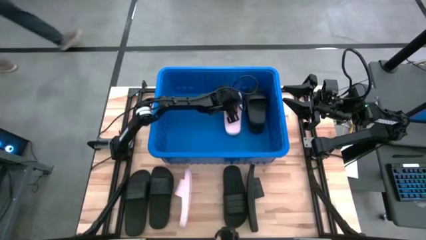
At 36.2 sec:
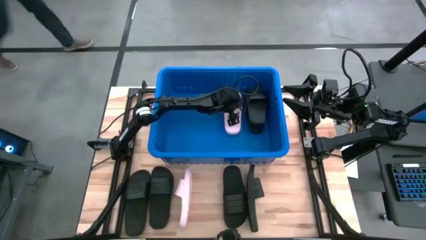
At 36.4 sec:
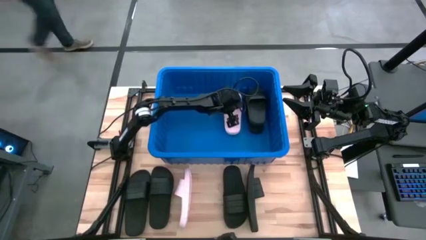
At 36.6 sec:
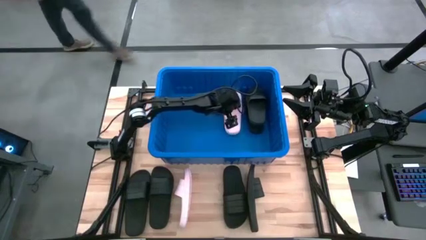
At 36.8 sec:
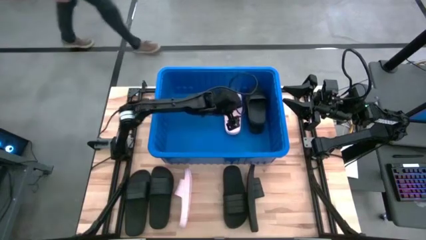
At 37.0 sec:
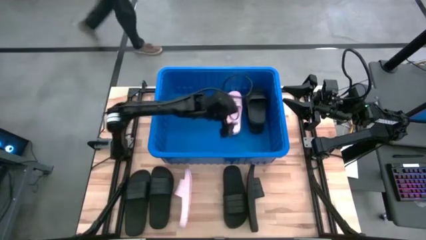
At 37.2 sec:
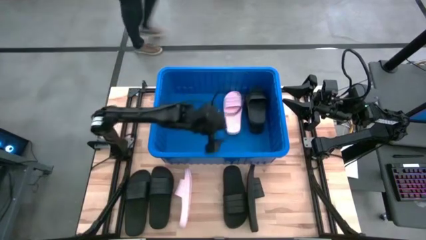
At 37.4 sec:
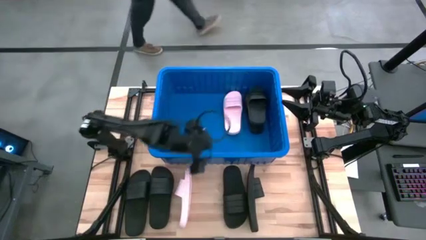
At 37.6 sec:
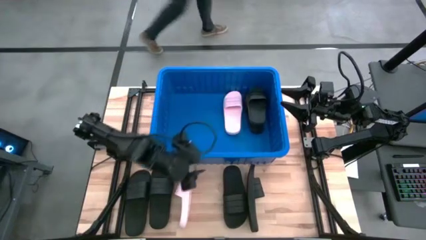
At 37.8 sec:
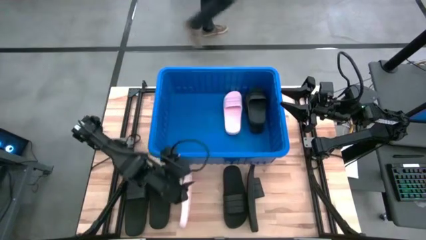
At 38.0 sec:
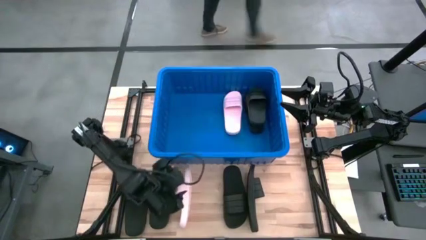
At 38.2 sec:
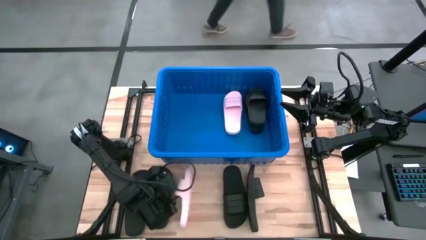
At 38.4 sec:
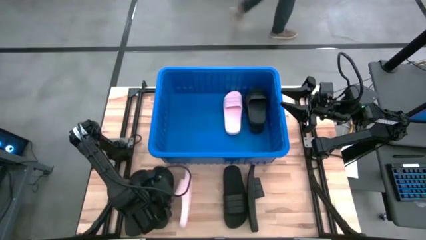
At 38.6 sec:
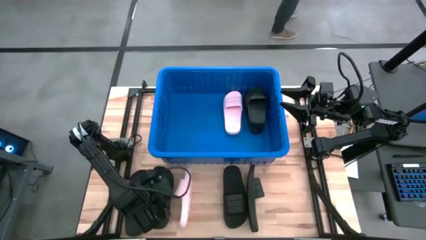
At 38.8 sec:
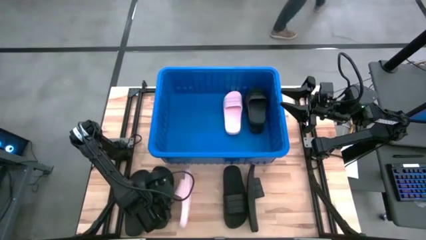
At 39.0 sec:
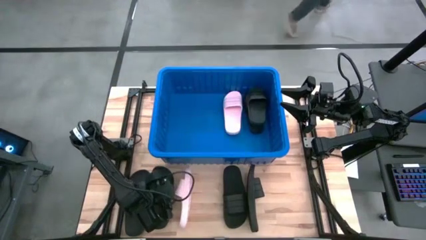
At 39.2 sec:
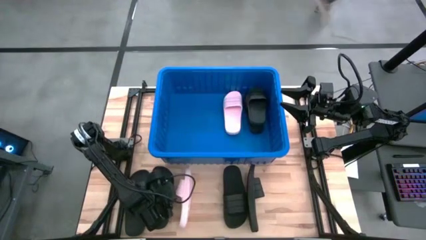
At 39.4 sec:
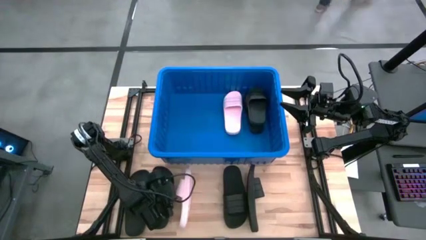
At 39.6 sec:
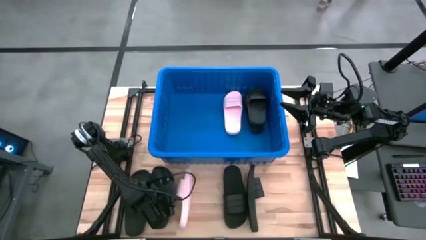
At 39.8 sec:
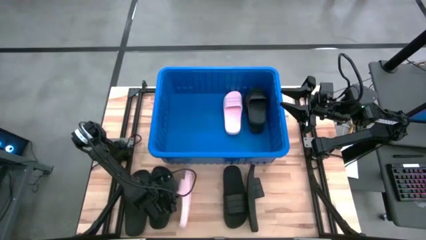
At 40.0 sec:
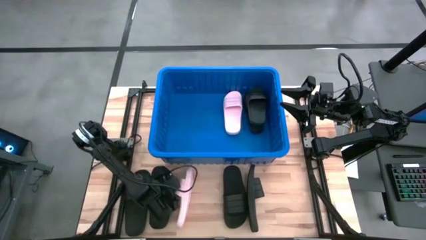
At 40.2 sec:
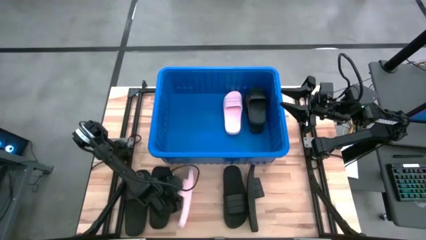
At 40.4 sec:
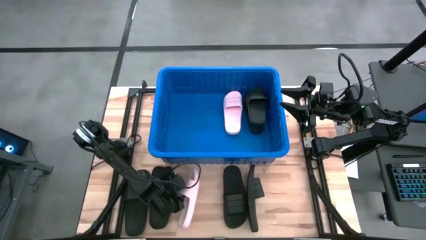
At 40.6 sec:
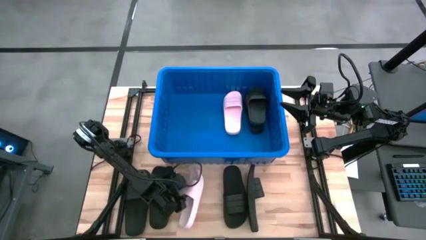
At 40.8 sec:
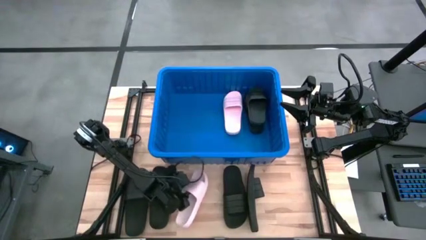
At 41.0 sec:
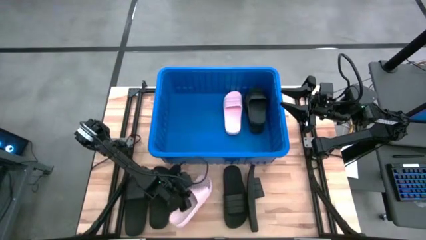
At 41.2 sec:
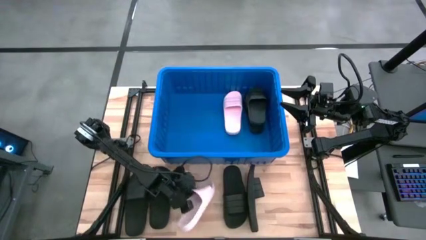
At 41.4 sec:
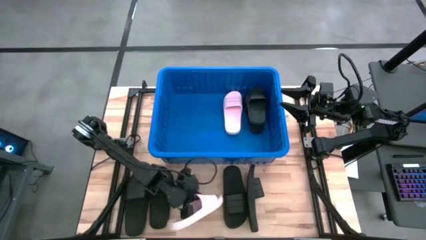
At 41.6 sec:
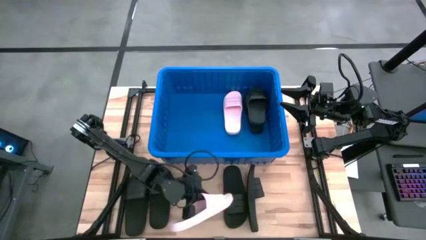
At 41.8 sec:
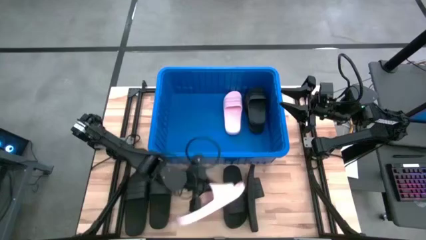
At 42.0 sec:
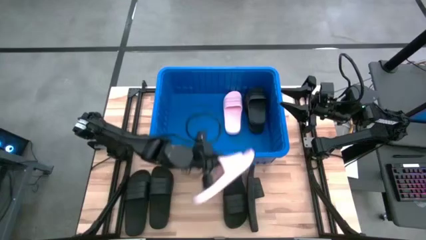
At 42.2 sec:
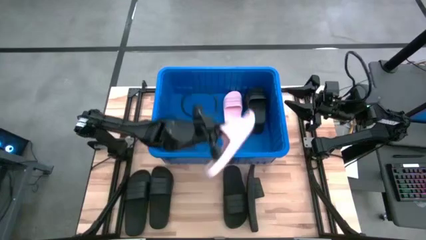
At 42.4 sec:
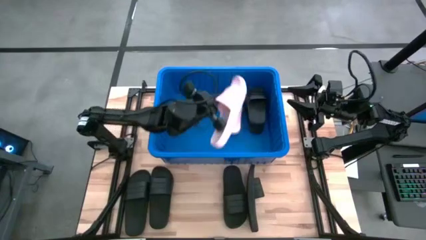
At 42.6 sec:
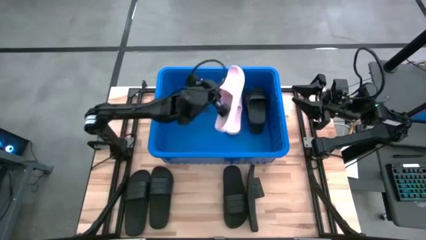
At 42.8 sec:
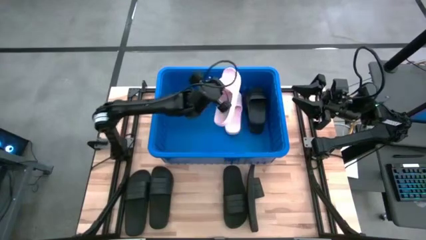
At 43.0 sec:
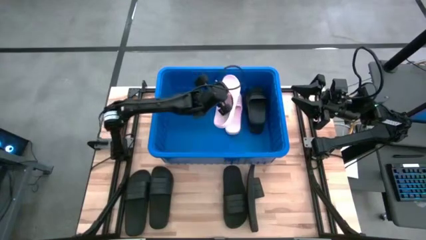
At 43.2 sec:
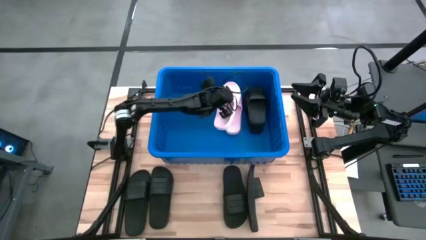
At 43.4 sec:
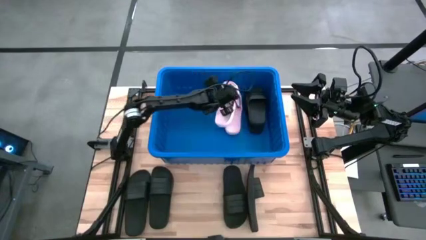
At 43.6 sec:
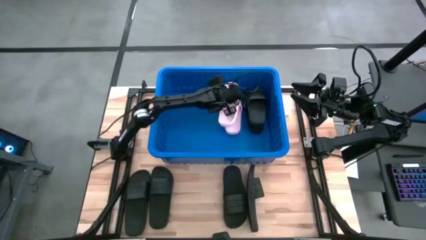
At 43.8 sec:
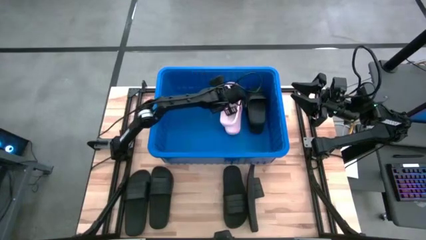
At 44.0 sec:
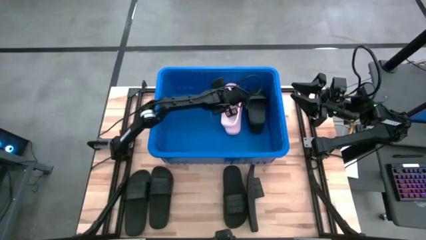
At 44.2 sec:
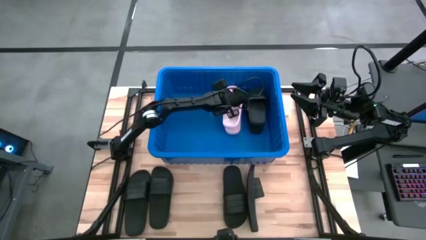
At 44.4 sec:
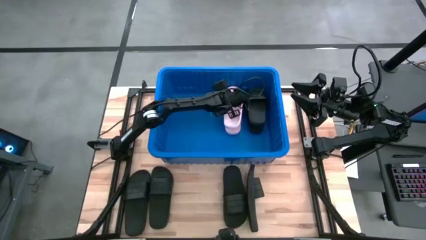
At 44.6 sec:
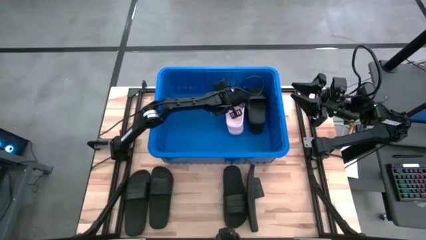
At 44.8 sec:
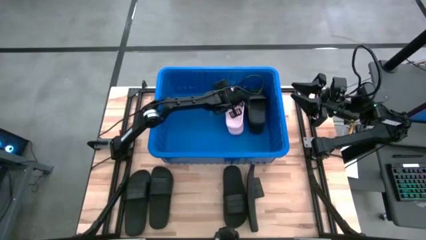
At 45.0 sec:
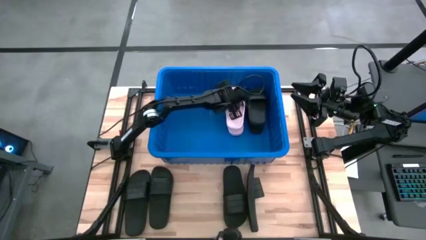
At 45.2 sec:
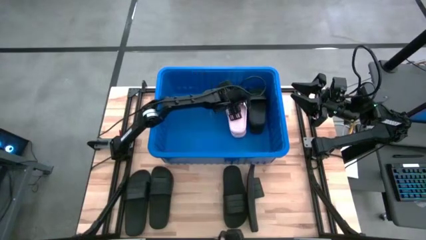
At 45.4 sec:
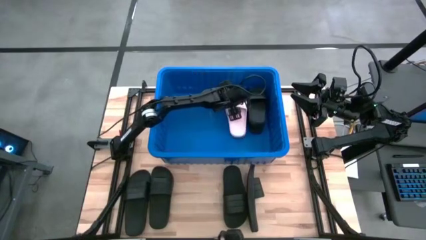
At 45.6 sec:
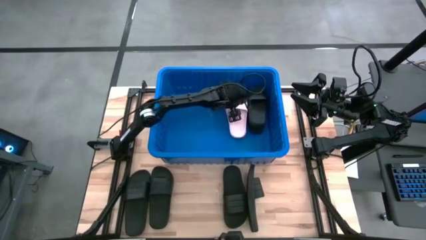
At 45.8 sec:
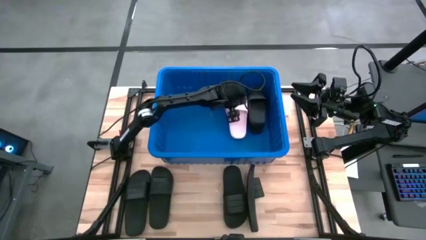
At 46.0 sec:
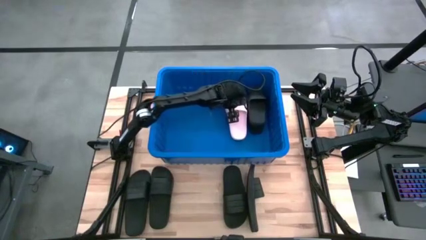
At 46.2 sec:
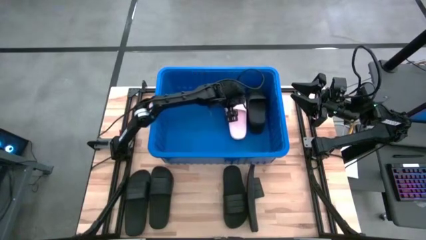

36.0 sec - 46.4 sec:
Task: Pick and place slides into bin
Put the pink slide into the bin

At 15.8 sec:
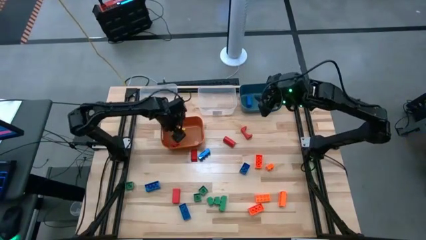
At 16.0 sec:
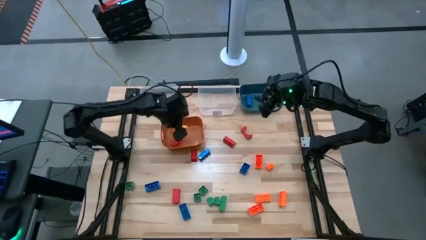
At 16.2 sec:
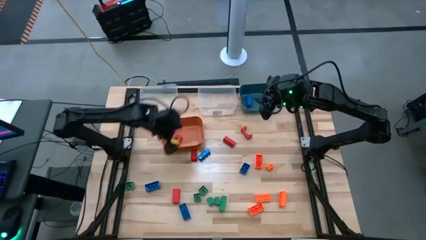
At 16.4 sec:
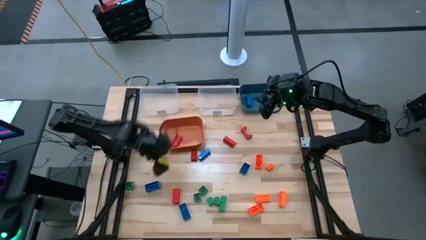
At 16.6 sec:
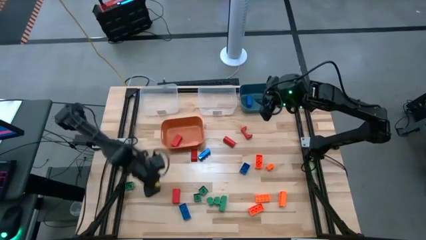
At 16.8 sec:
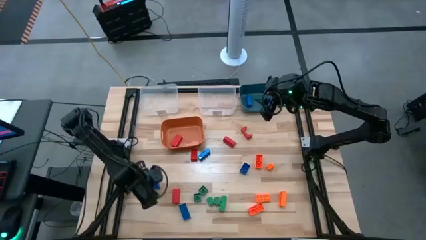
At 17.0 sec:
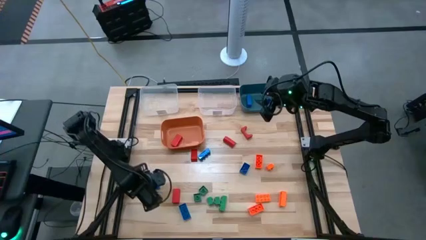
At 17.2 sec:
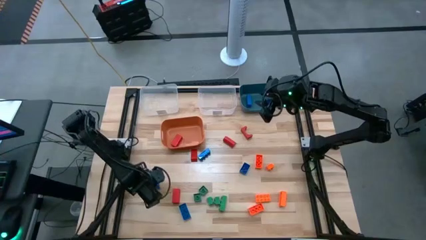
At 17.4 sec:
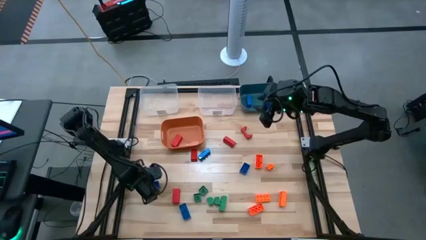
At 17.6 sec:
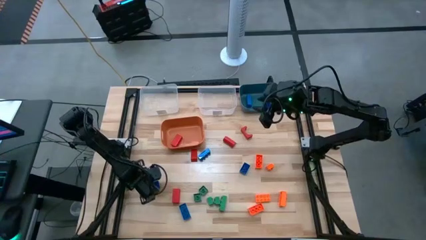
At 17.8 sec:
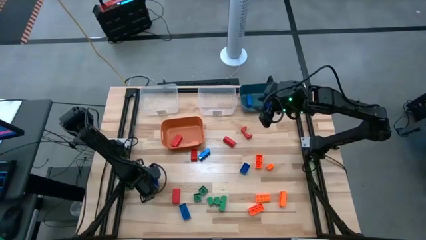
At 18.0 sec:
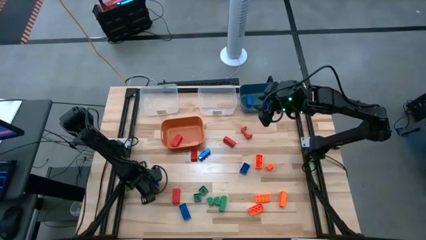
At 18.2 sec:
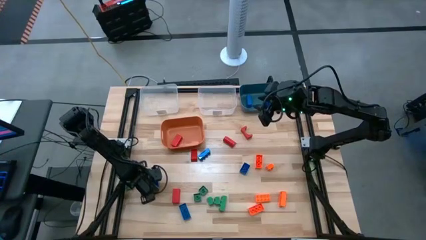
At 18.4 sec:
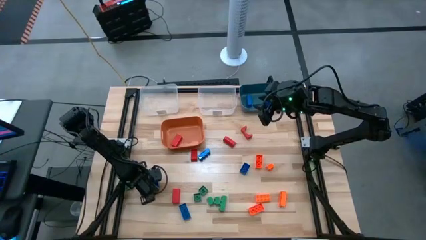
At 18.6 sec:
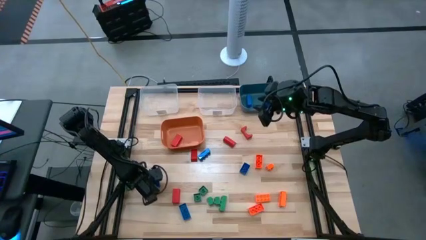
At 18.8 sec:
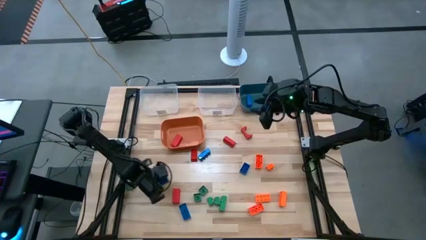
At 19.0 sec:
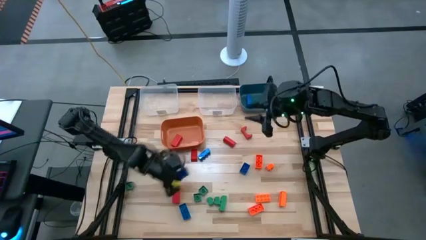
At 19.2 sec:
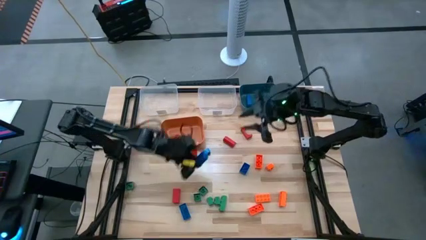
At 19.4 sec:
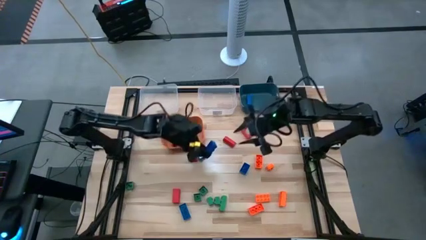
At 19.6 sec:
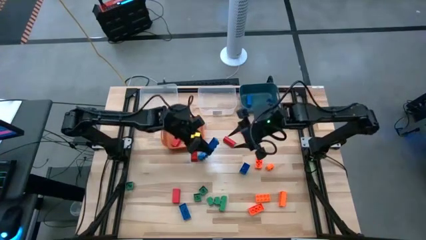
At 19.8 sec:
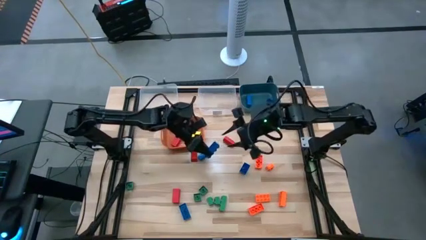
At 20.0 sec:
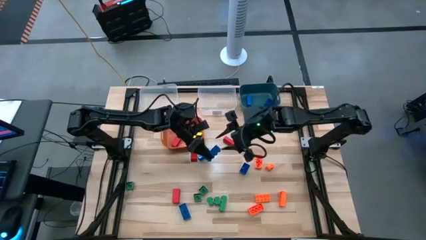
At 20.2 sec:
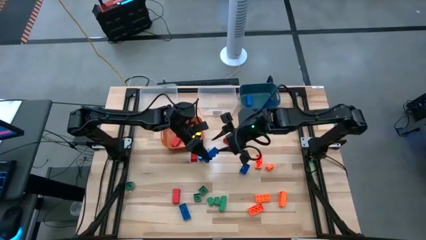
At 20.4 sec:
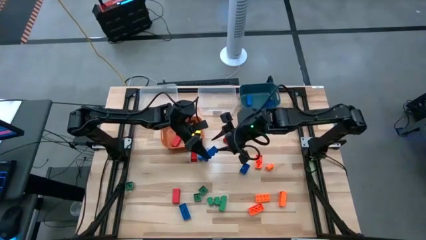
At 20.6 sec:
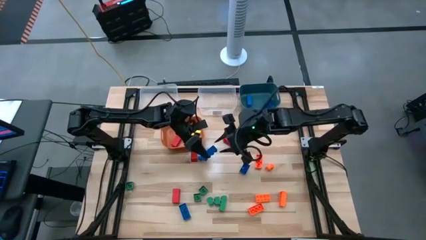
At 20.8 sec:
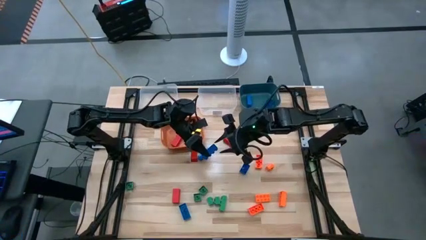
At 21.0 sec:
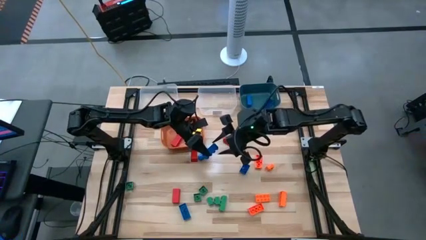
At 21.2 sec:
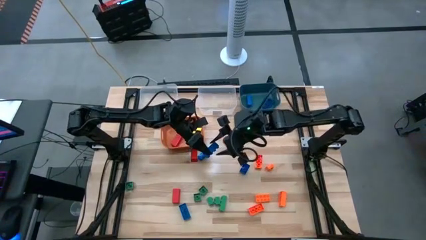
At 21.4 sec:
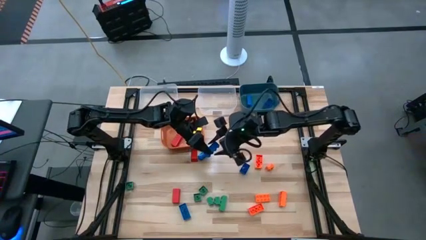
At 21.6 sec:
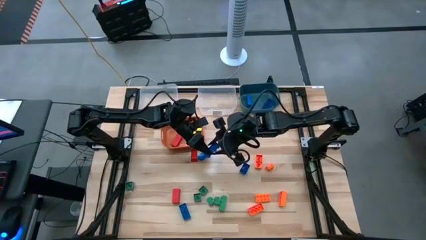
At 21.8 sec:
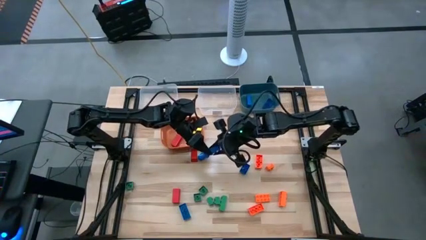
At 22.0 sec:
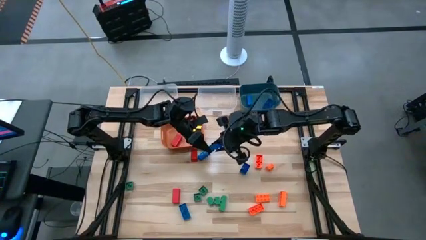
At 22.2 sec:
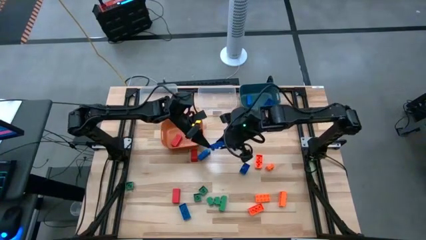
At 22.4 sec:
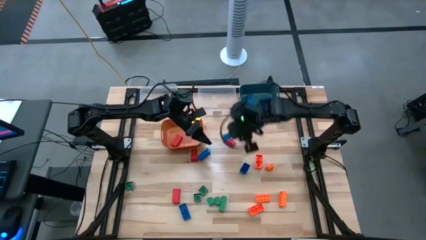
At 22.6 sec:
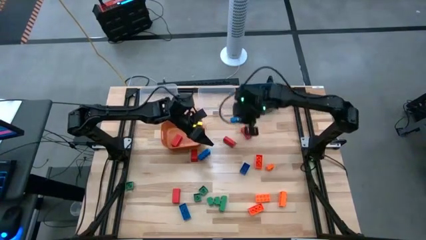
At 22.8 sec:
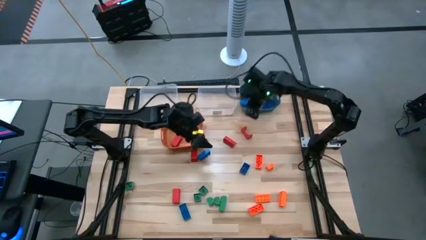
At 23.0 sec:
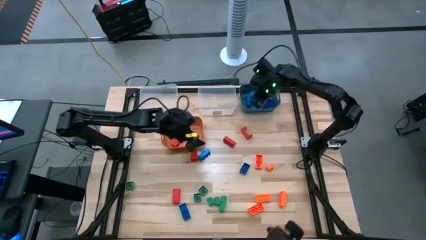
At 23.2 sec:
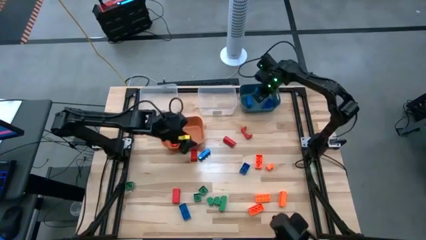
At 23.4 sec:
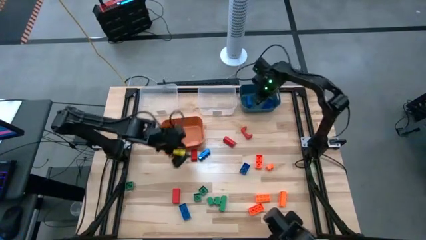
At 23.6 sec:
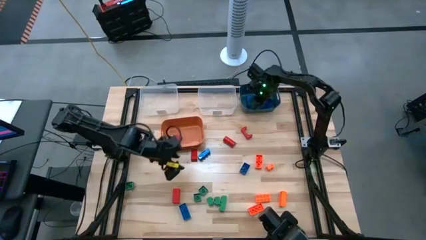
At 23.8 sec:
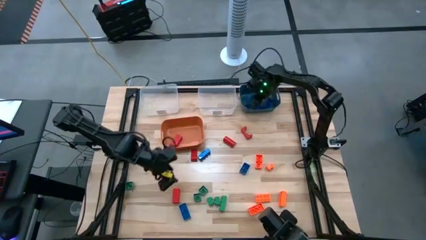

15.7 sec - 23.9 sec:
Task: Sort blocks
Put the blue game piece into the blue bin
